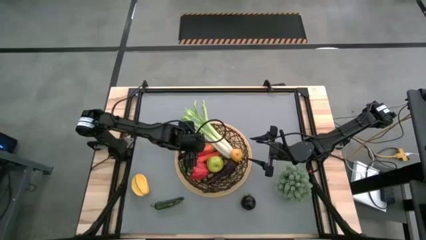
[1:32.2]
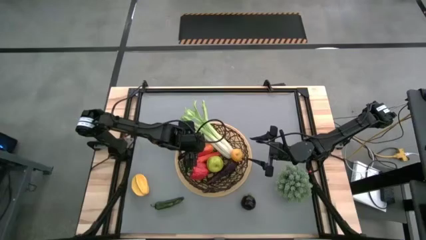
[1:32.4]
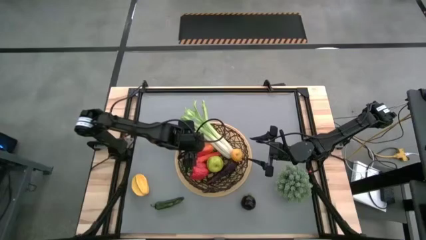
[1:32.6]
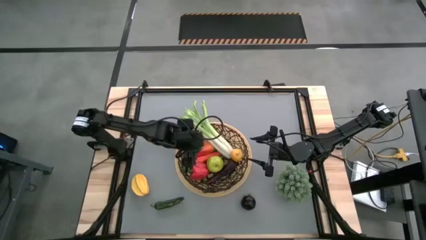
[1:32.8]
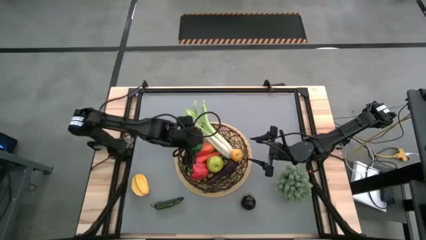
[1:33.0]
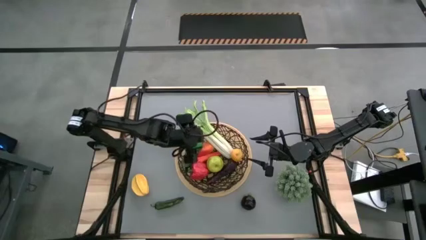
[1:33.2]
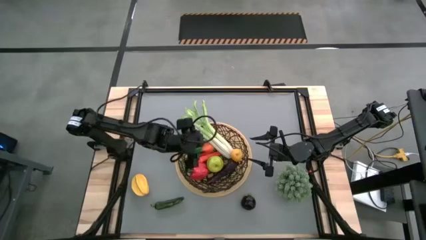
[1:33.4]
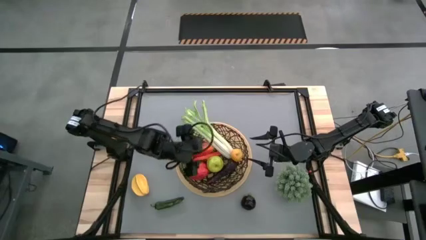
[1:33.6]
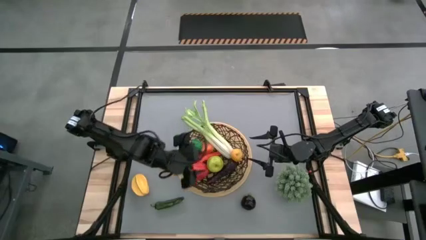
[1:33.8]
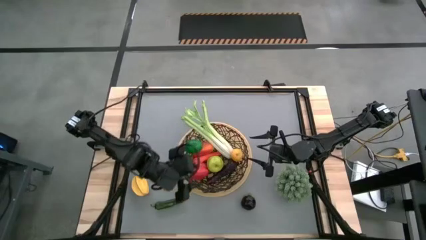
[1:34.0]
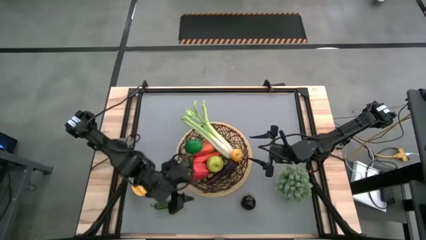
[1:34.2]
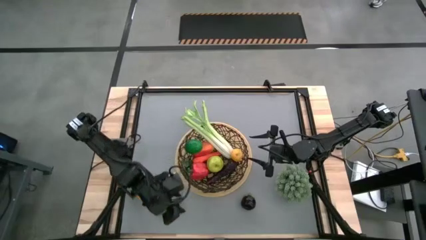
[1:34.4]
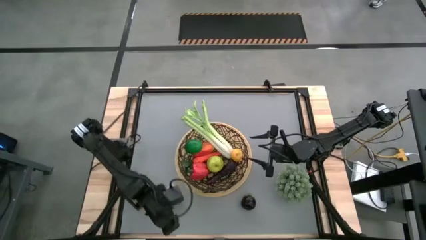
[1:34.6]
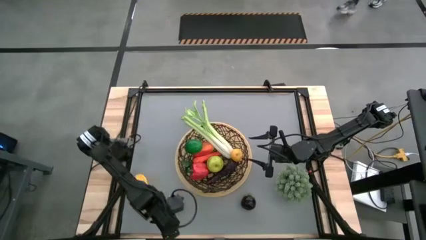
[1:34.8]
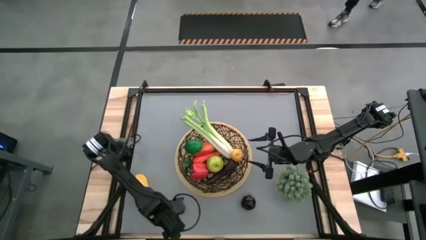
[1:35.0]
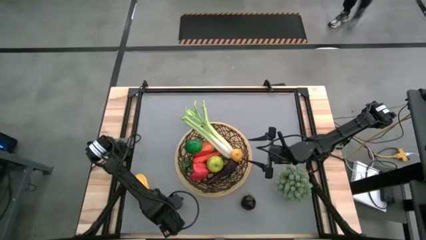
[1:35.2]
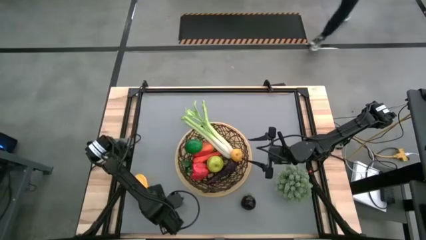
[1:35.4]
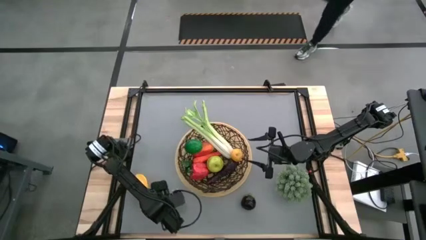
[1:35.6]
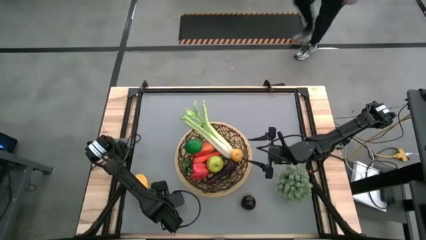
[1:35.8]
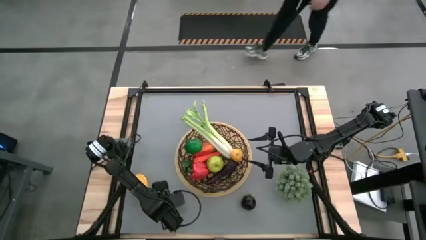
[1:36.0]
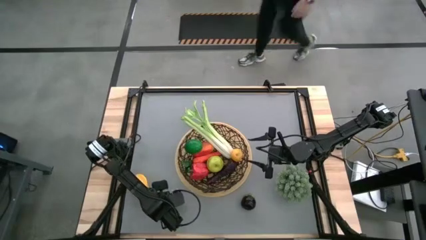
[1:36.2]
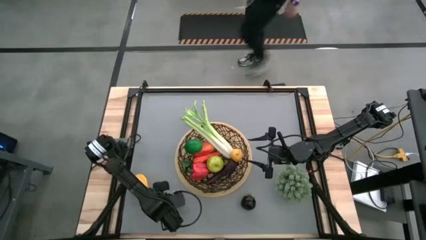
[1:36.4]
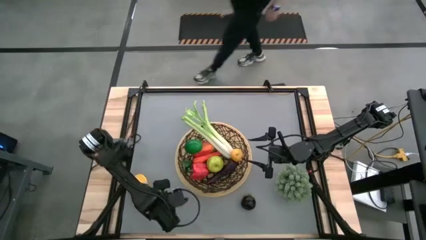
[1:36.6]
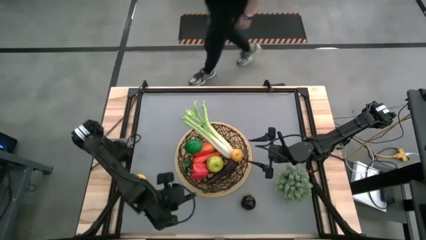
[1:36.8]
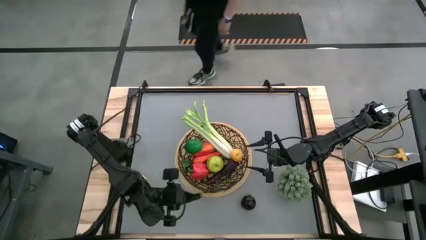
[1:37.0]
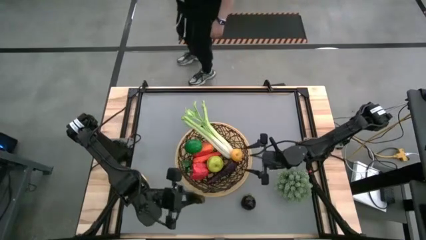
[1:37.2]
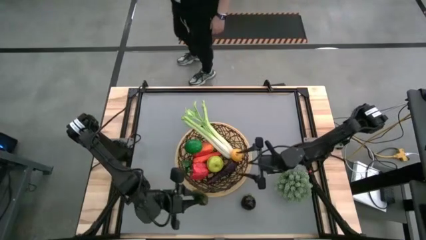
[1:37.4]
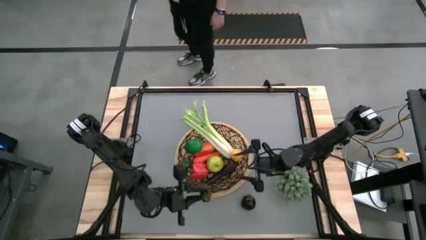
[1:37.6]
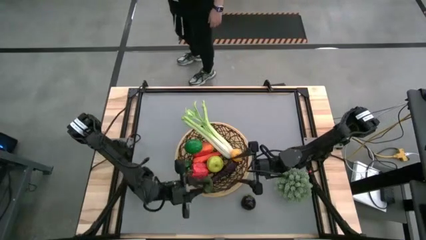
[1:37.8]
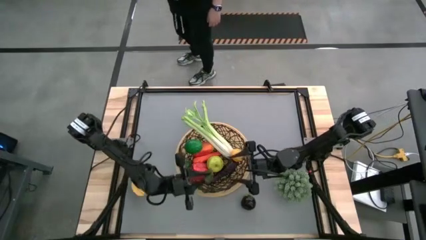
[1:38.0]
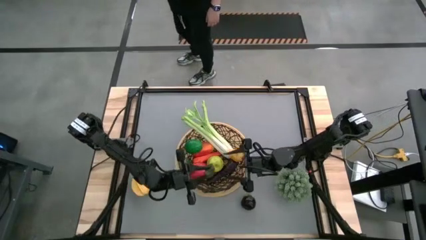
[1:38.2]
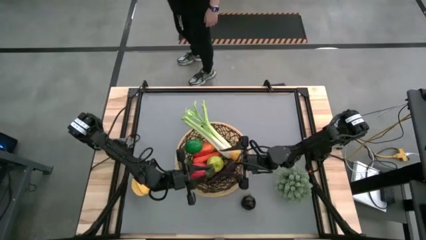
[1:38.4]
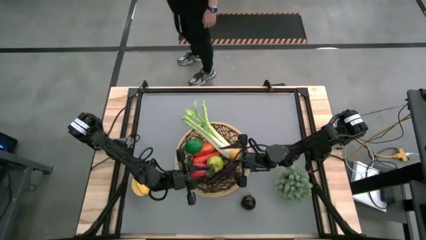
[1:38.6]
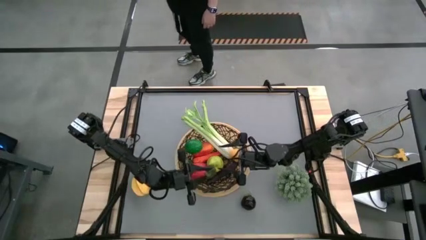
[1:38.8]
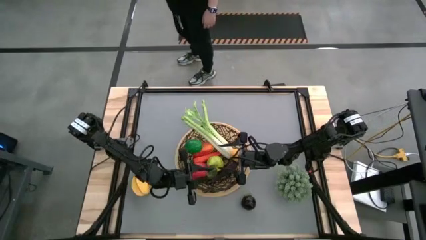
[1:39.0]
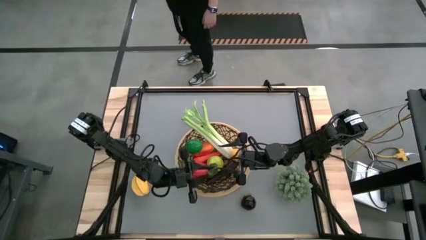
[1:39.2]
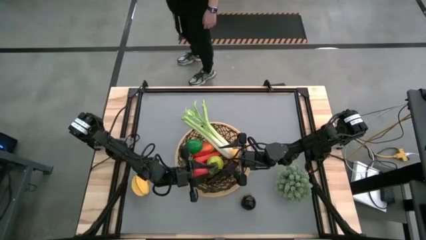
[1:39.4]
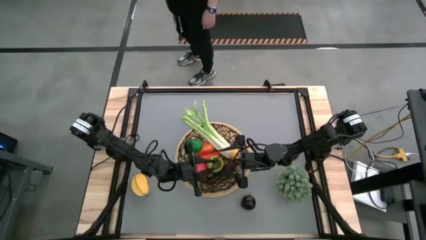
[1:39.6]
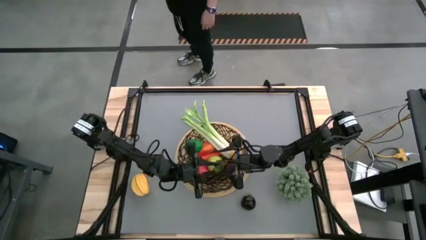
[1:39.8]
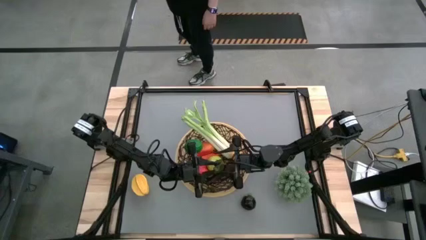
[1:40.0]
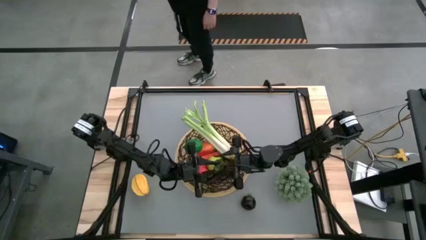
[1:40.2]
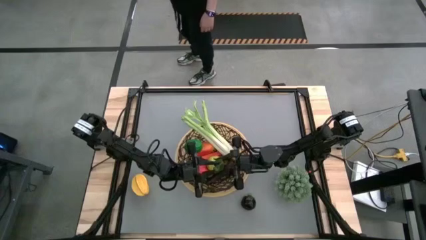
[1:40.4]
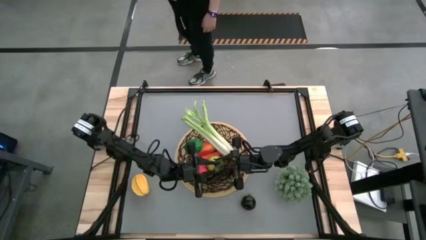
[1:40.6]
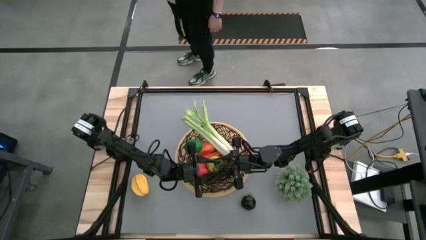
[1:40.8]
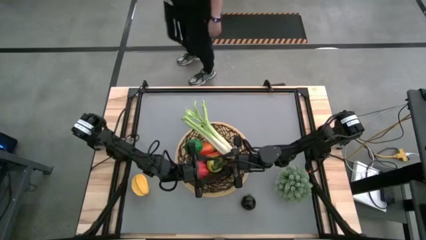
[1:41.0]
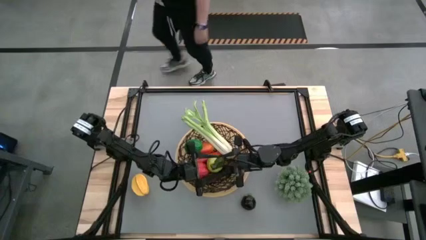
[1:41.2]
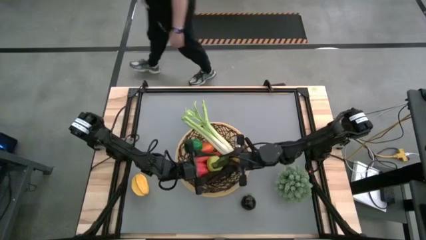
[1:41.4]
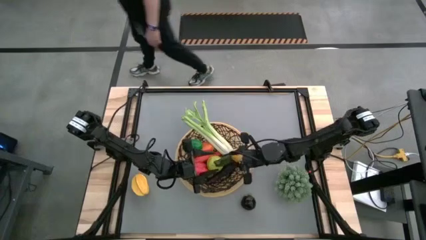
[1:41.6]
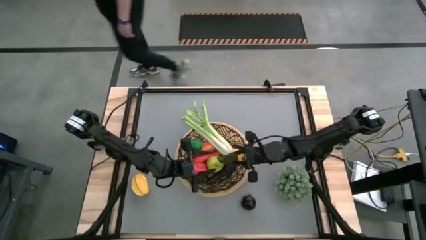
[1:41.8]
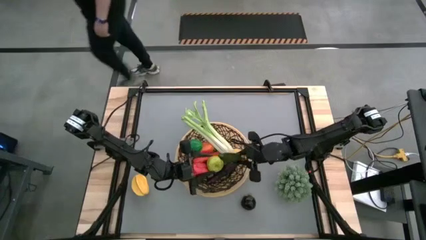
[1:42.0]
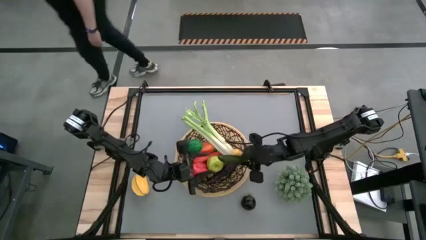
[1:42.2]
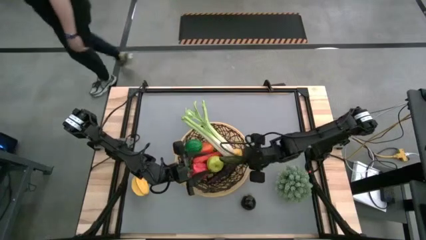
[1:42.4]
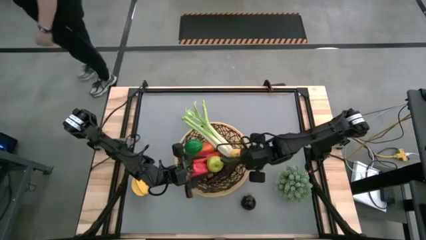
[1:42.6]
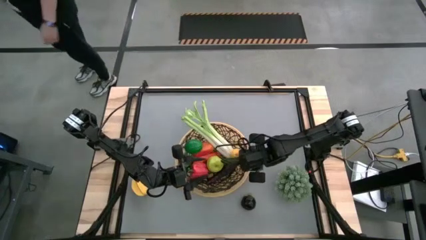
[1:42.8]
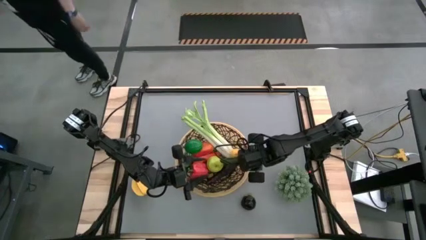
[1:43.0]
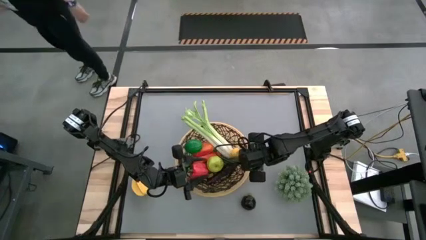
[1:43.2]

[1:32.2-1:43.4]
Task: Build produce basket
Put the dark green chili pepper into the wire basket

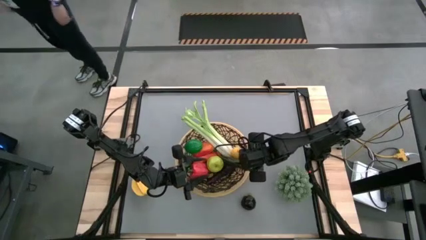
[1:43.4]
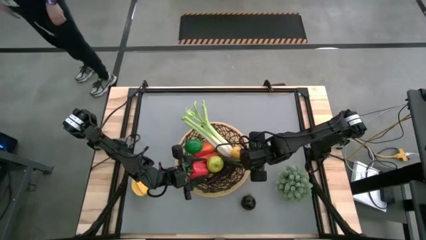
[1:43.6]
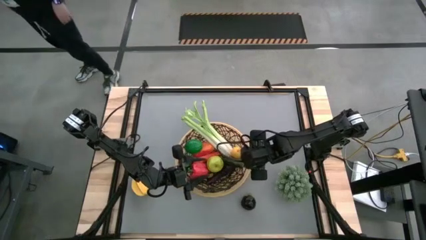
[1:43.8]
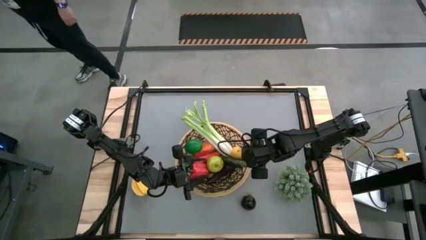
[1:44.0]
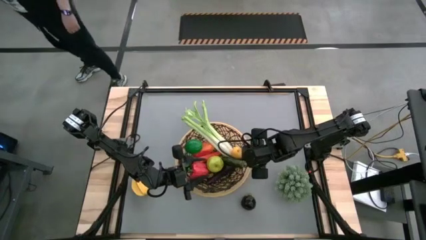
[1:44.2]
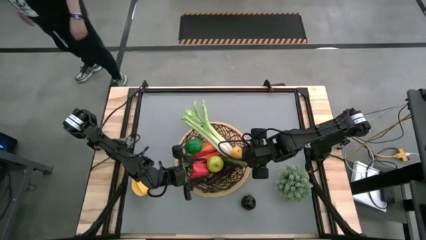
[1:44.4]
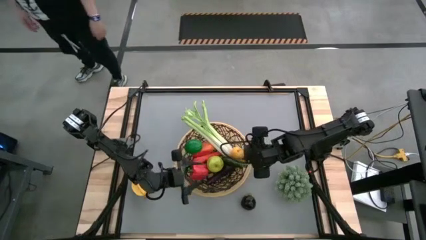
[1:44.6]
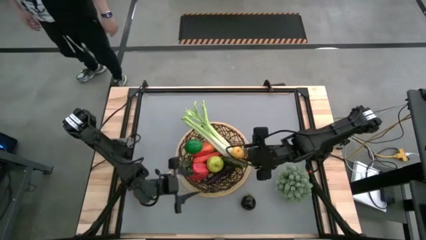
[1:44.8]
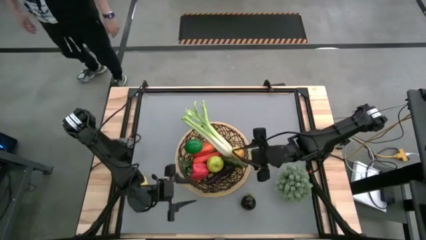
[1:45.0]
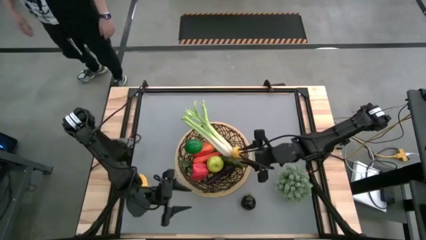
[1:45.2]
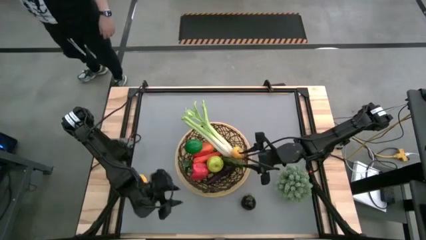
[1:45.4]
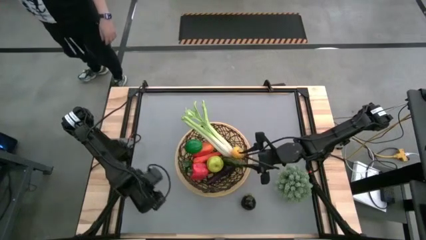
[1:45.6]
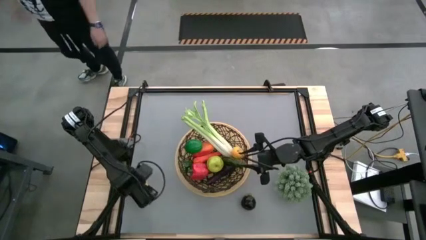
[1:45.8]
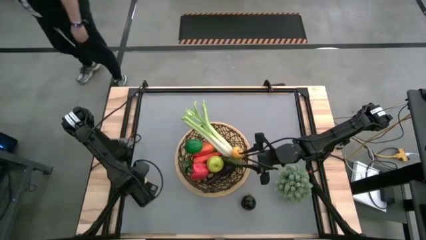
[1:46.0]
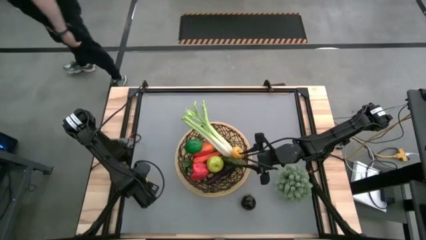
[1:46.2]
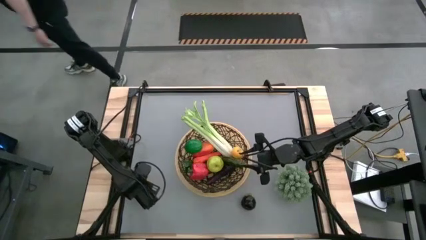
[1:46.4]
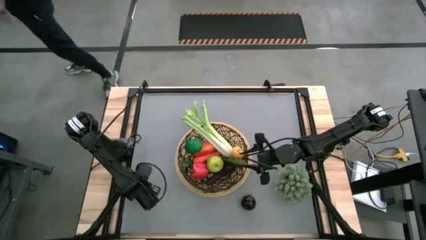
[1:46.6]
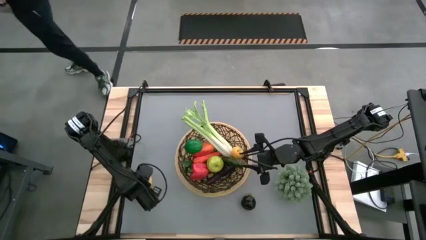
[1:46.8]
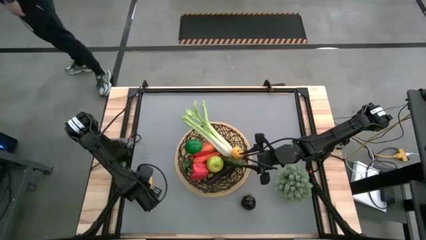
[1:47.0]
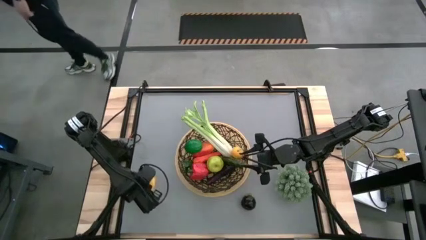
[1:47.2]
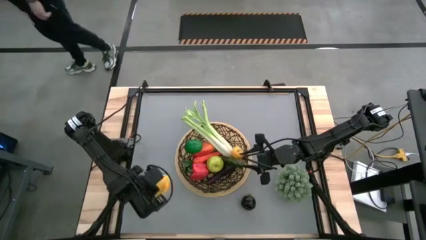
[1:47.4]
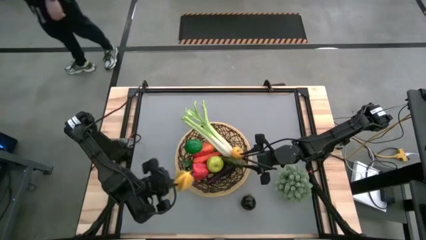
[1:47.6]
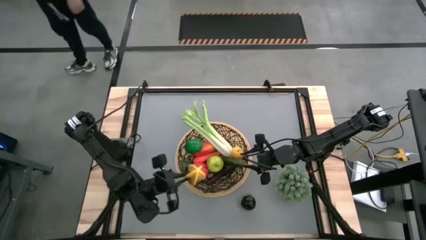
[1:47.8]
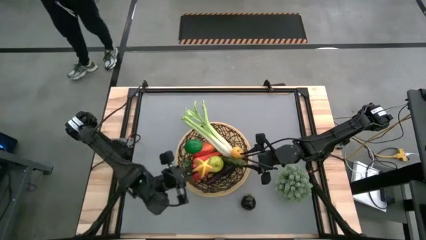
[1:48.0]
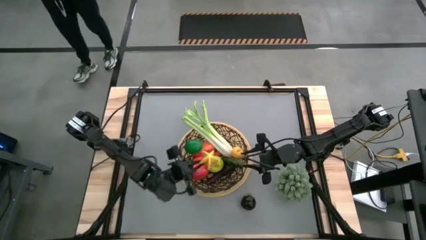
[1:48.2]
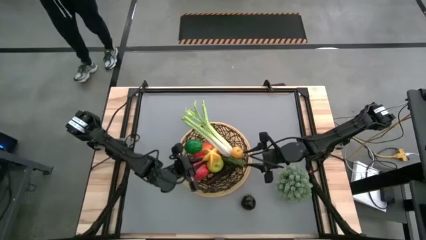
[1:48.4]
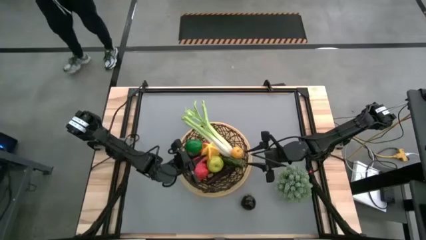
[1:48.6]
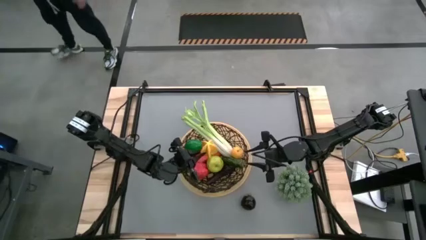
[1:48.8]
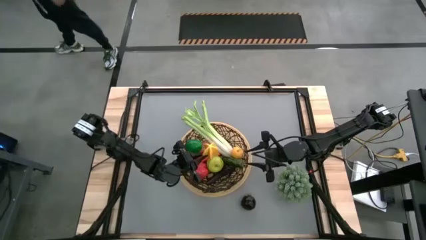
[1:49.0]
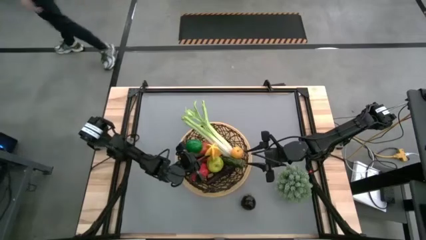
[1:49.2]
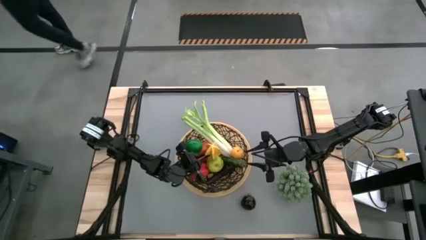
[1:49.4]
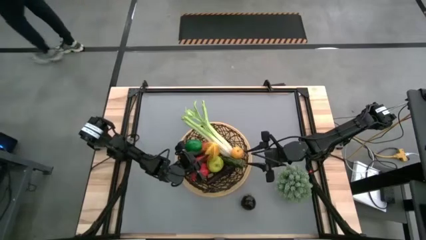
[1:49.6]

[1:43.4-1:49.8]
Put the starfruit into the wire basket
